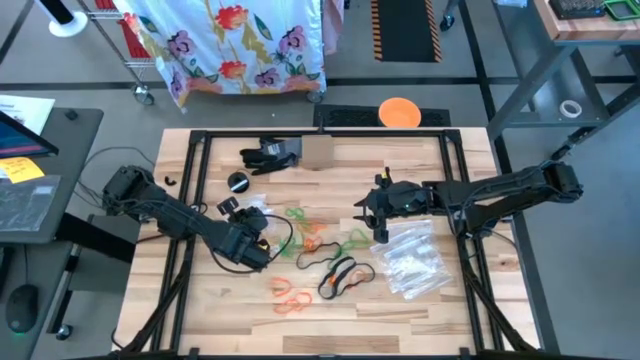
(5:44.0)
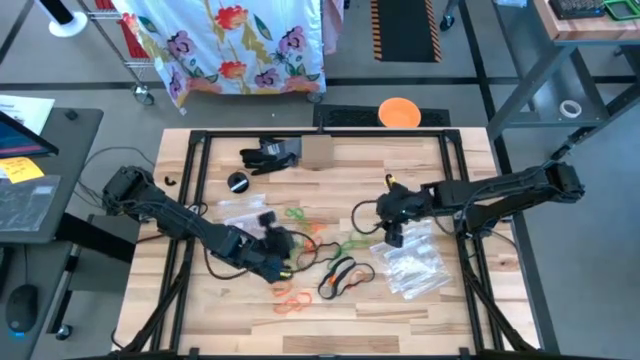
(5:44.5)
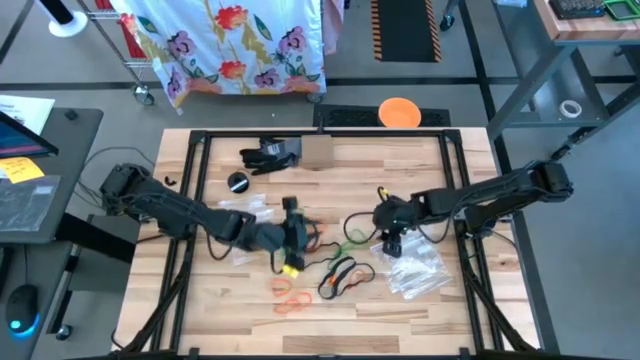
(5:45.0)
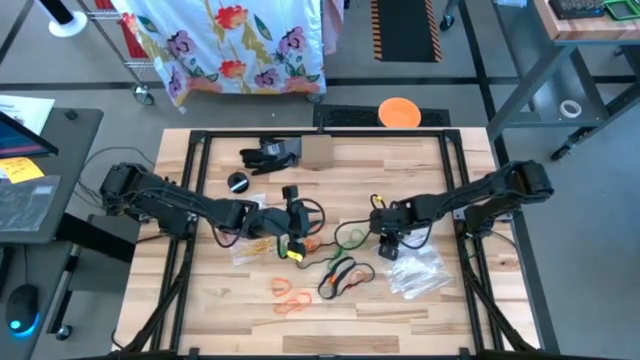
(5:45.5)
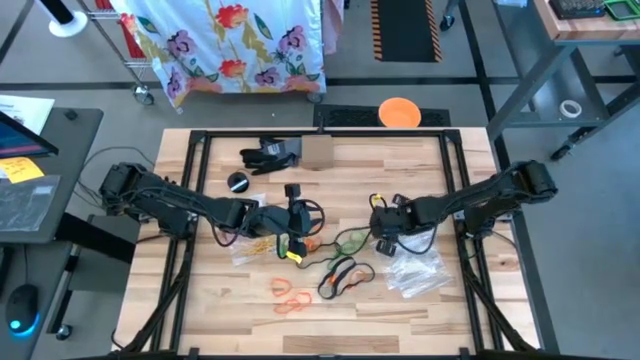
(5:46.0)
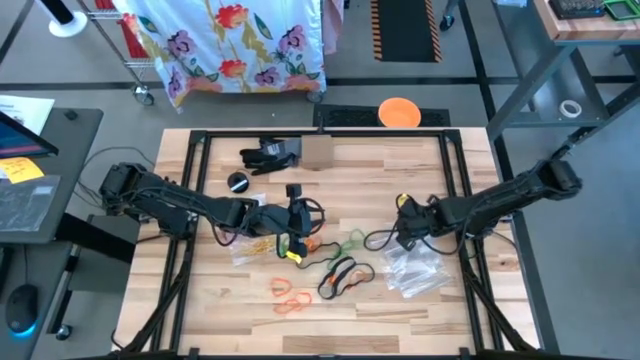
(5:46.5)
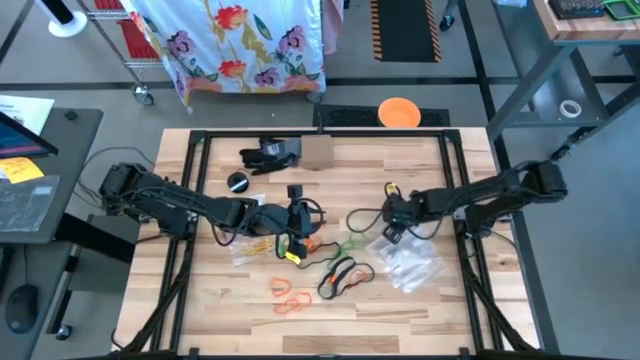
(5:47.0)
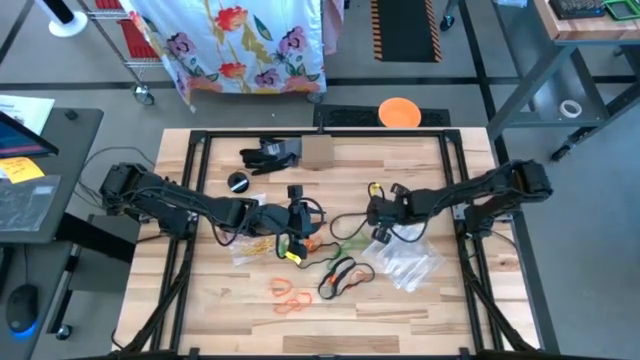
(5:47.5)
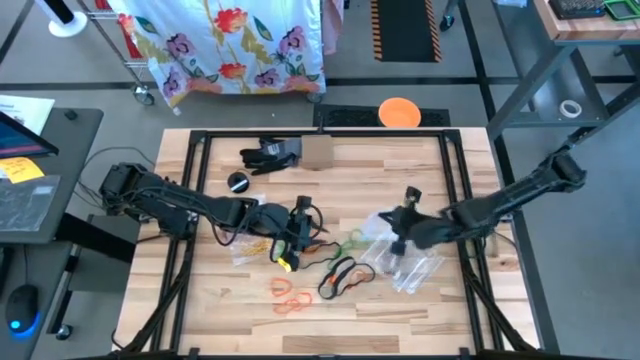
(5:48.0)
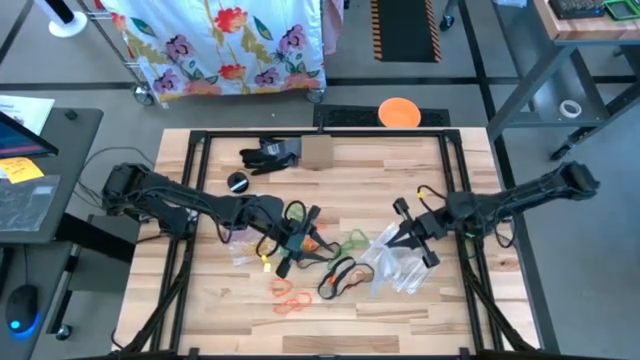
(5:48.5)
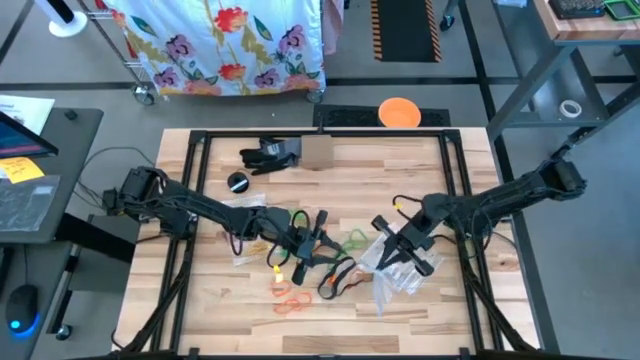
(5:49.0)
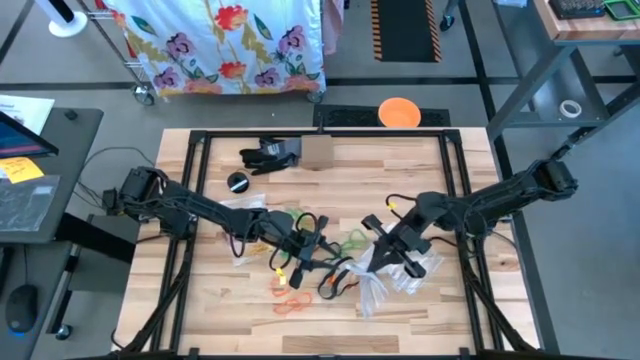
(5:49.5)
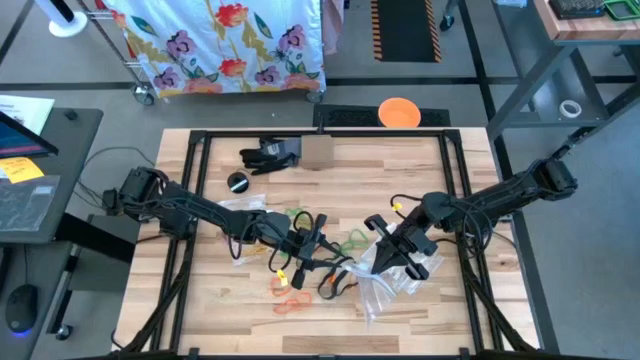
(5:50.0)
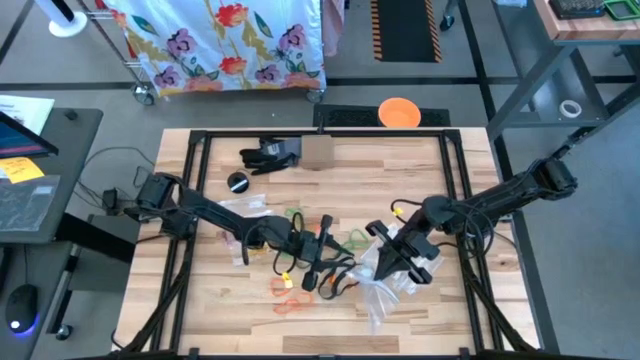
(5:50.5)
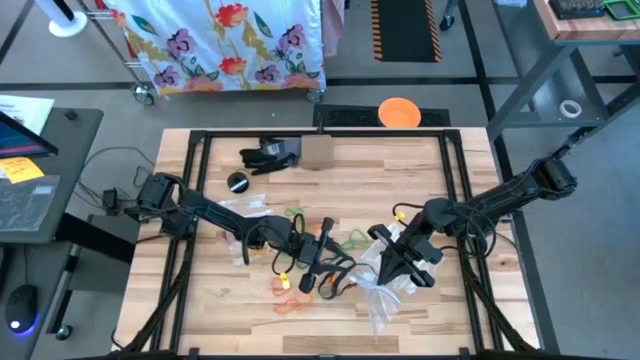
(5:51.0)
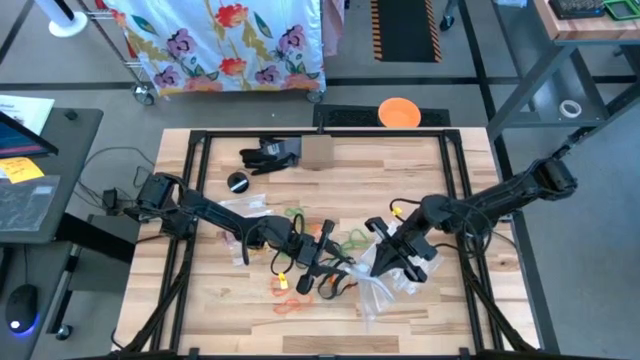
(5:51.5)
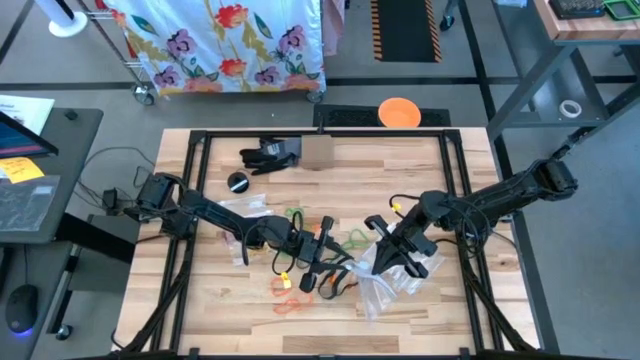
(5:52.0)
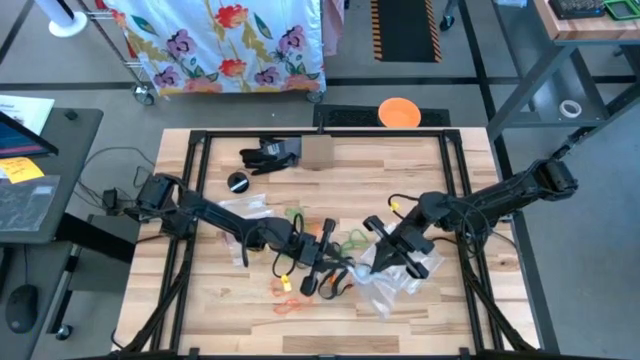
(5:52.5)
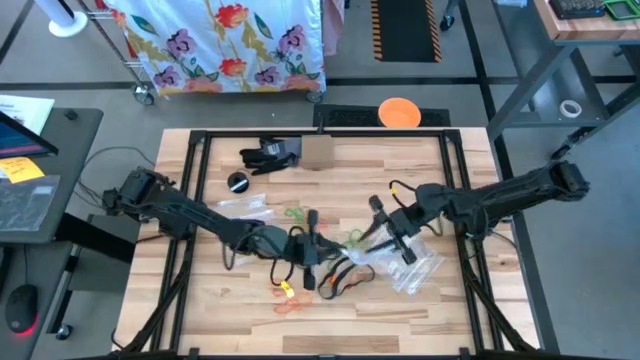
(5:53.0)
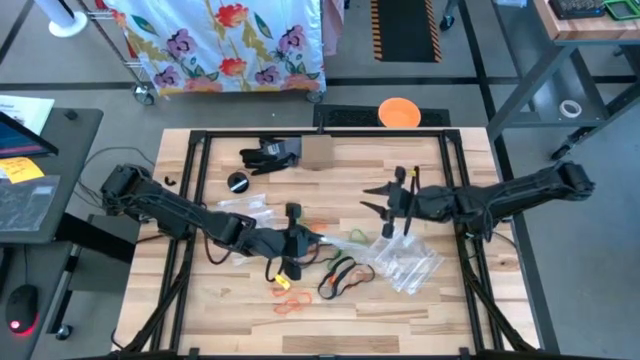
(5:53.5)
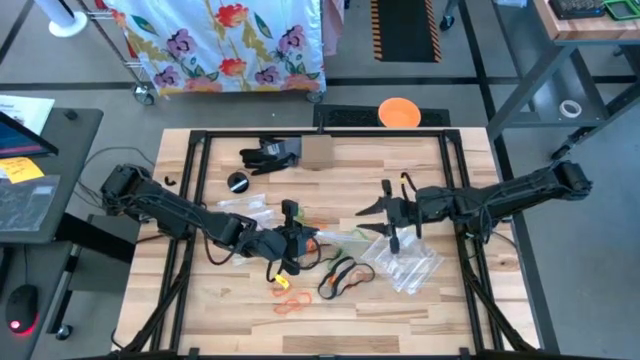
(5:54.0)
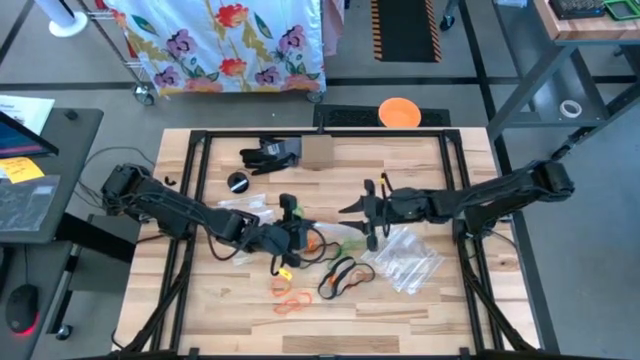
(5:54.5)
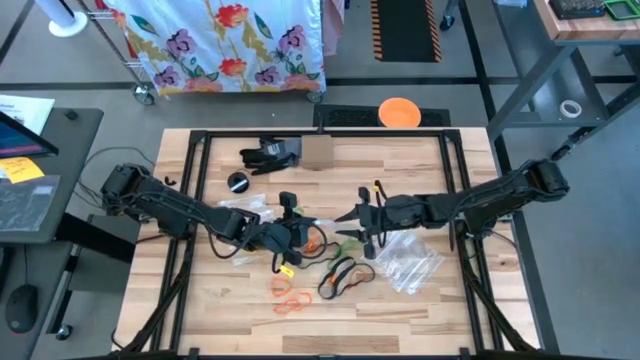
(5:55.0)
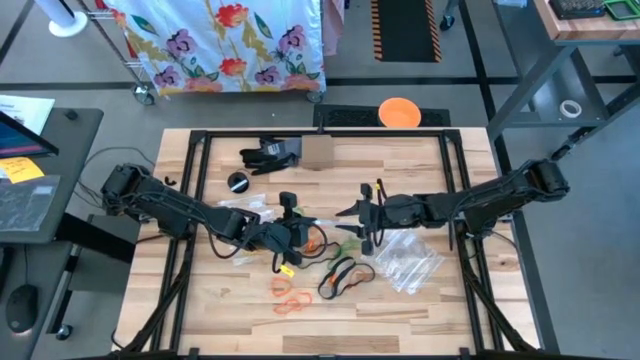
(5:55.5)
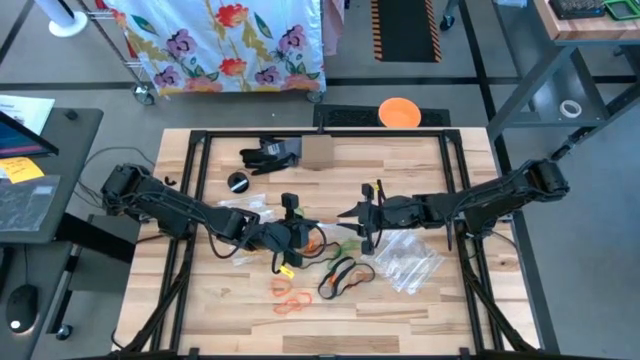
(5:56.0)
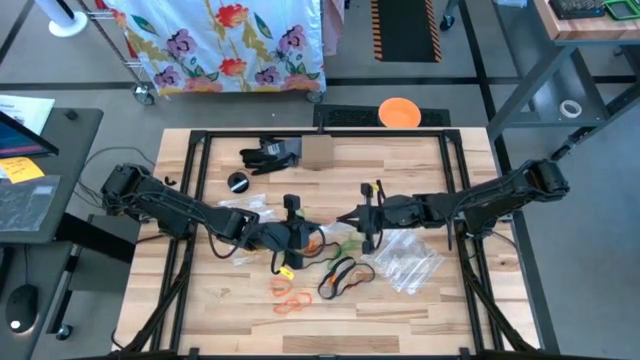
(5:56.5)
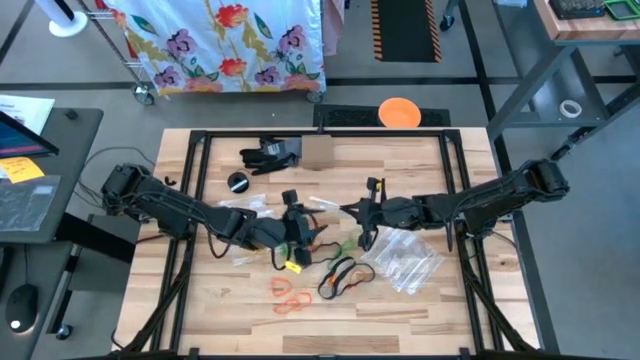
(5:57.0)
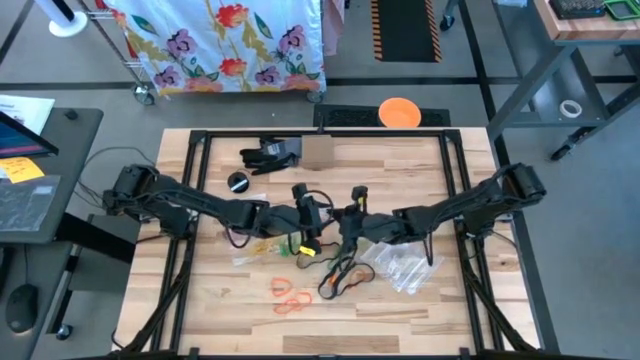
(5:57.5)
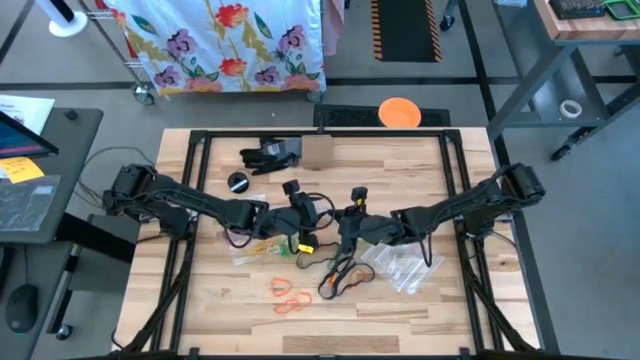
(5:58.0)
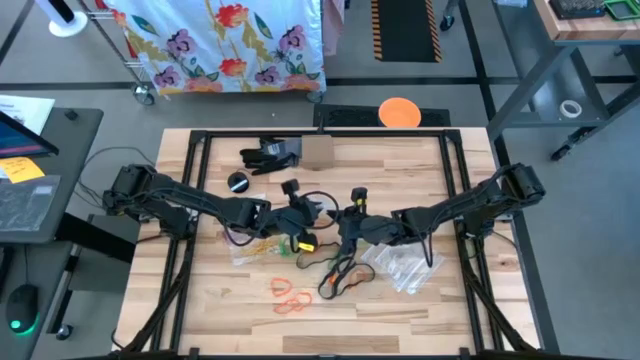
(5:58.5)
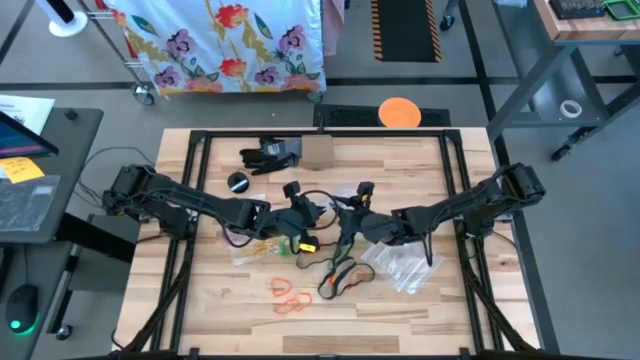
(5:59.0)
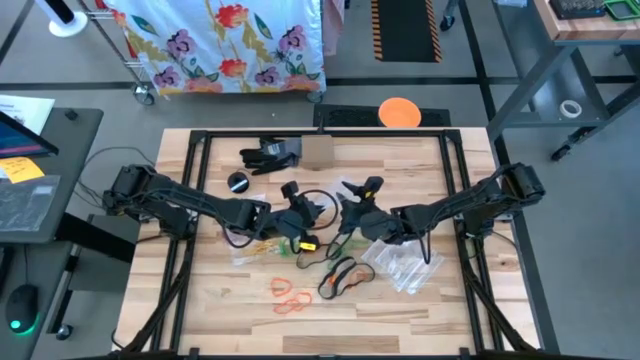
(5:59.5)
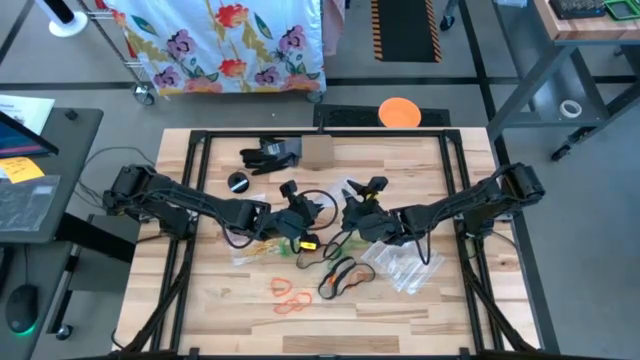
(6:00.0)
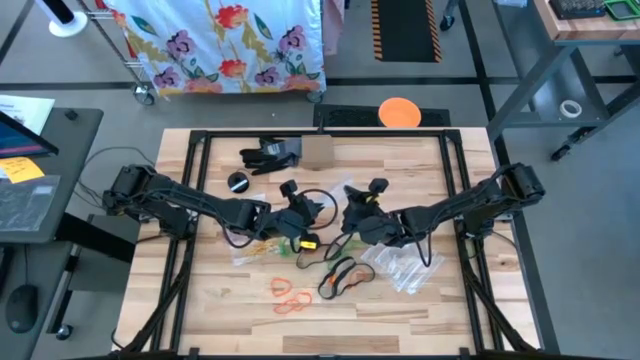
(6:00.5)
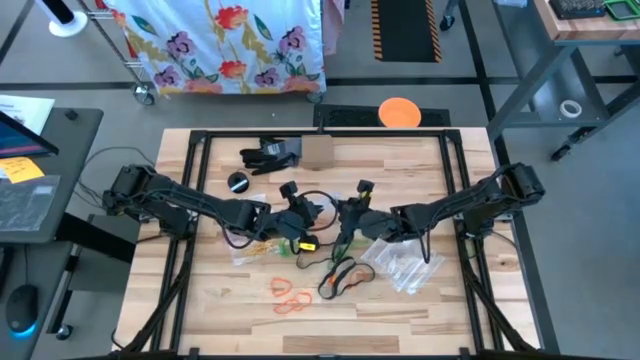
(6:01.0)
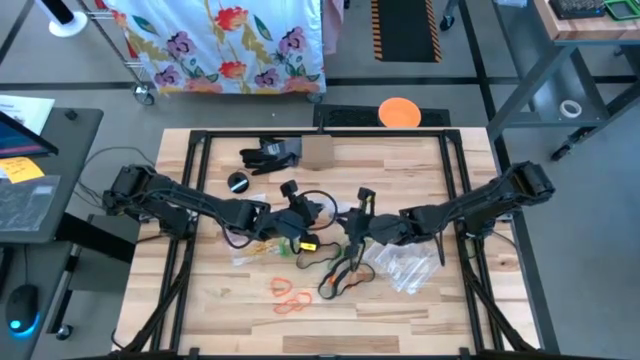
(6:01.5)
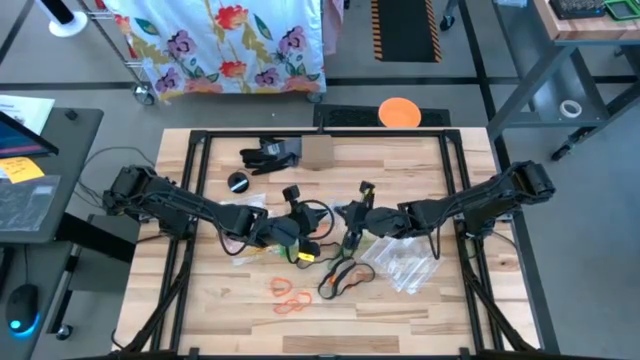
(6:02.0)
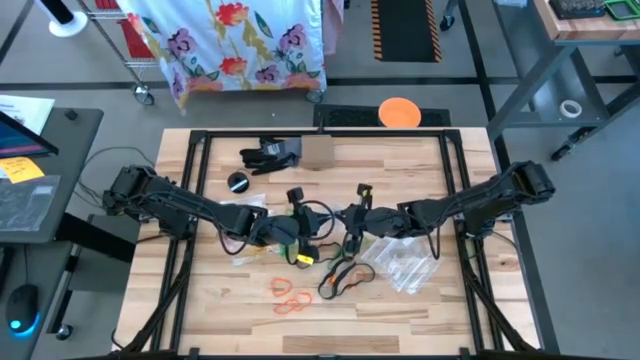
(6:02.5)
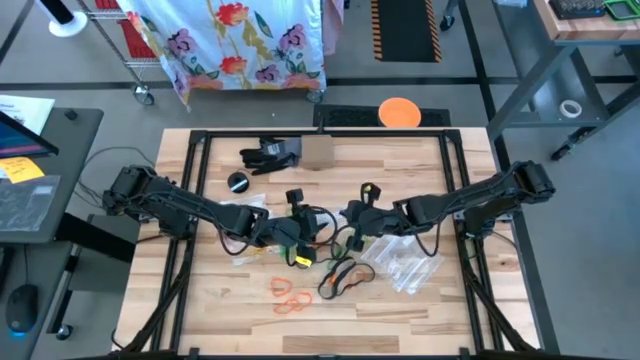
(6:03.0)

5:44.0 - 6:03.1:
Task: Sort rubber bands
Open the transparent zip bag

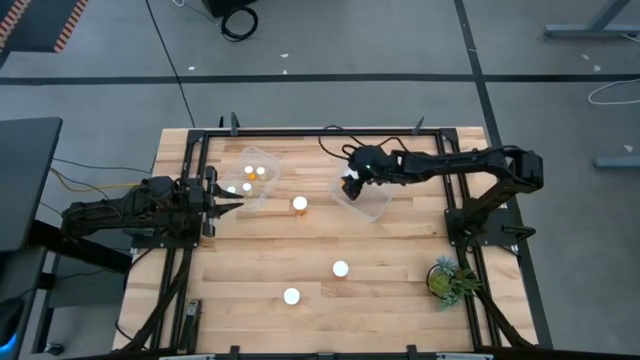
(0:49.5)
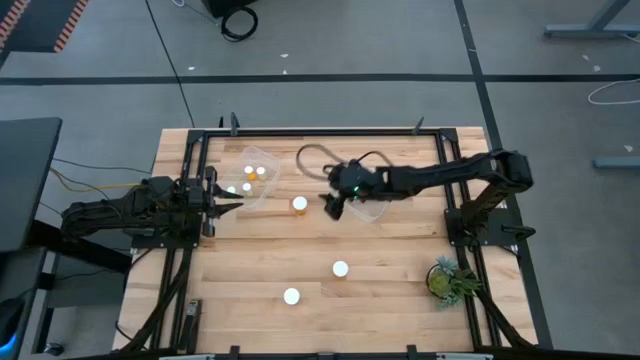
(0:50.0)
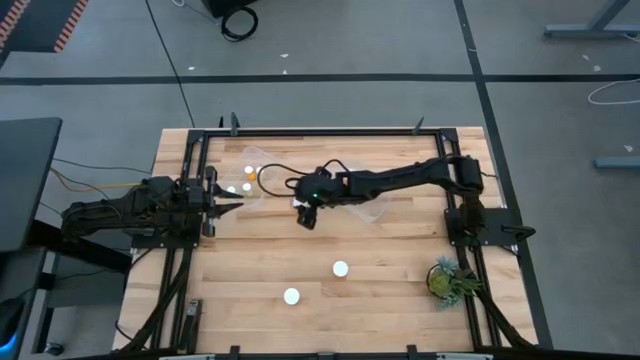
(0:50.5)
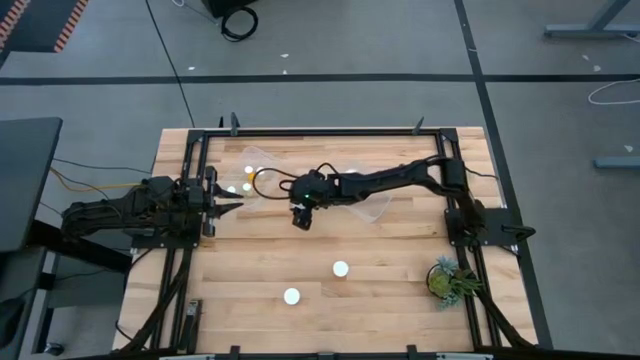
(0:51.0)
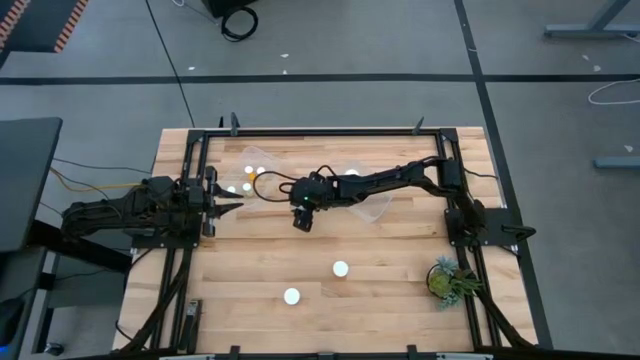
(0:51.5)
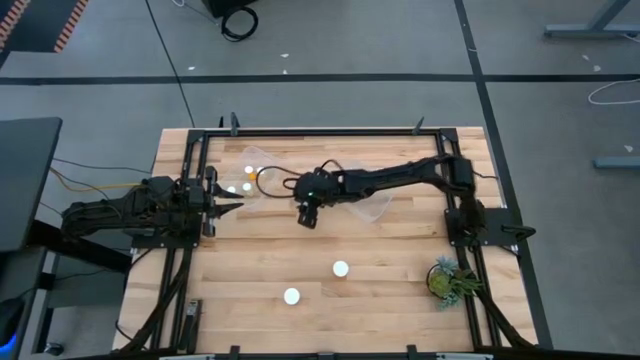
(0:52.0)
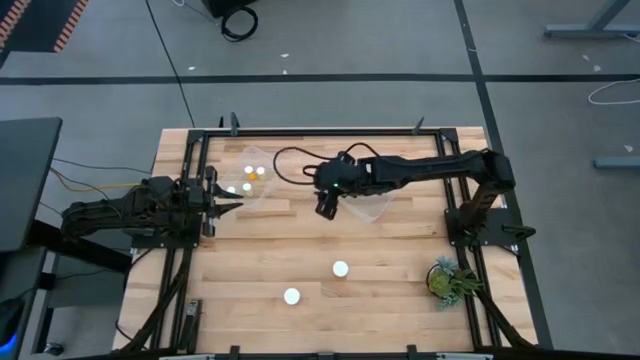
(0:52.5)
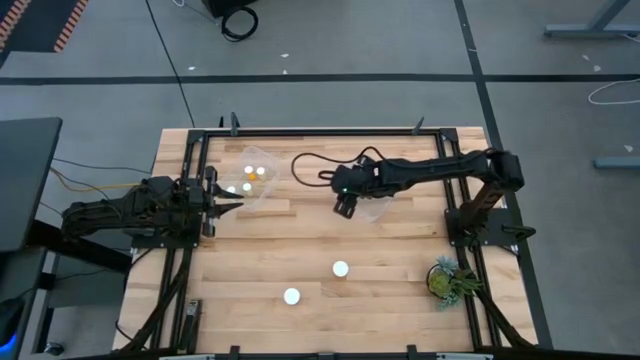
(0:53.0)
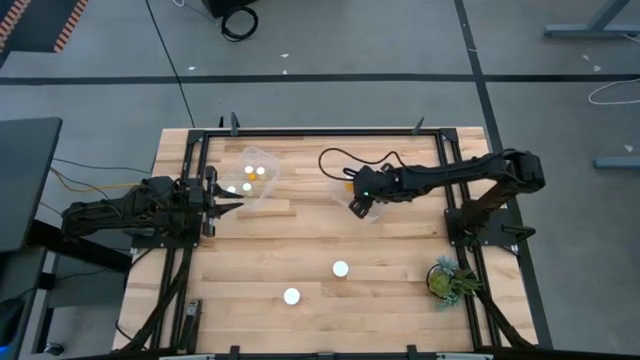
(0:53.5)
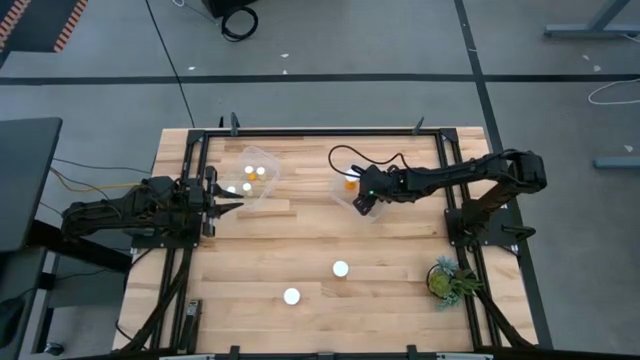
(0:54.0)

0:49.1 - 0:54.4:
Task: Pick and place medicine bottles into bin by pill shape (circle, oval)
Put the big orange pill bottle into the right transparent bin
